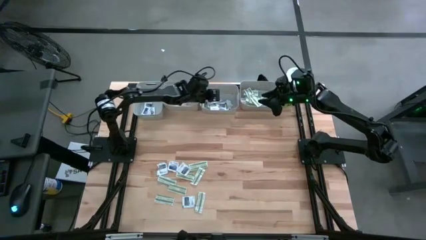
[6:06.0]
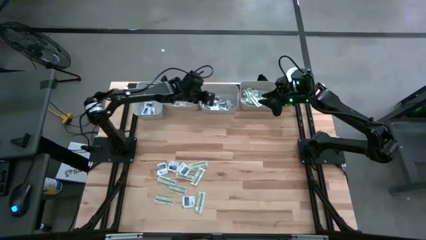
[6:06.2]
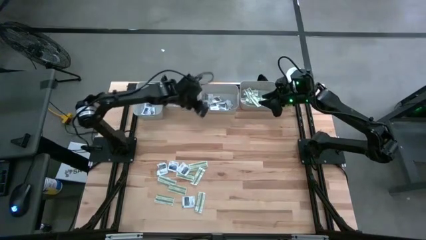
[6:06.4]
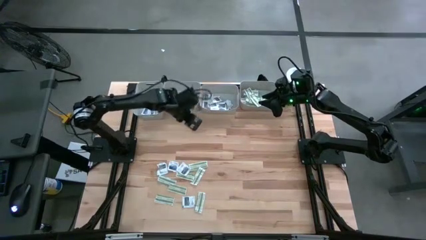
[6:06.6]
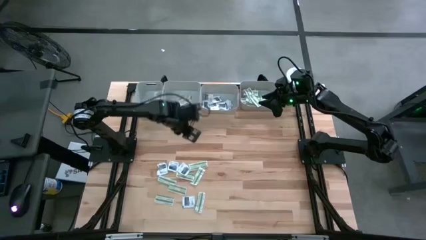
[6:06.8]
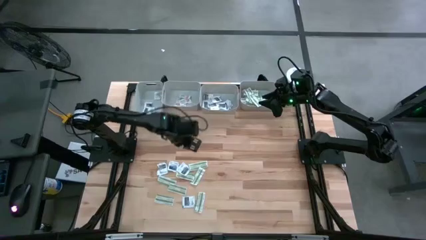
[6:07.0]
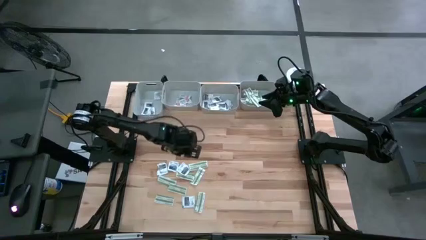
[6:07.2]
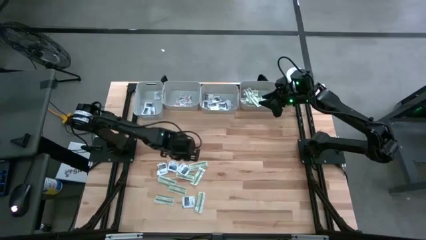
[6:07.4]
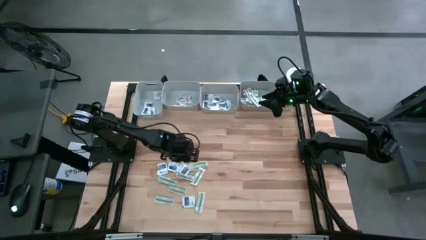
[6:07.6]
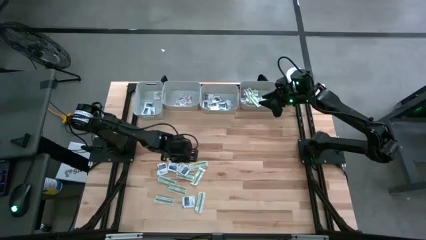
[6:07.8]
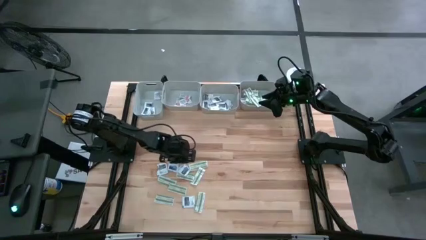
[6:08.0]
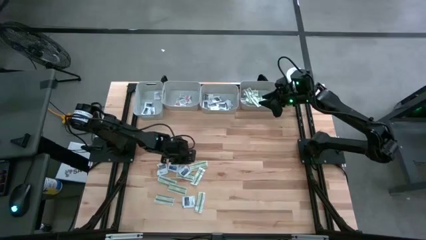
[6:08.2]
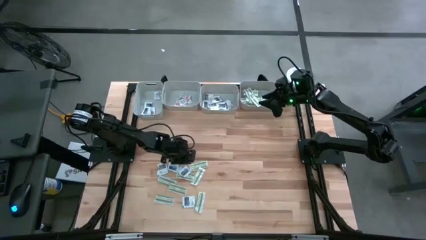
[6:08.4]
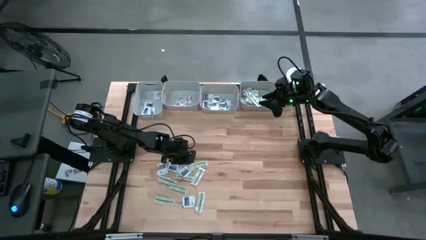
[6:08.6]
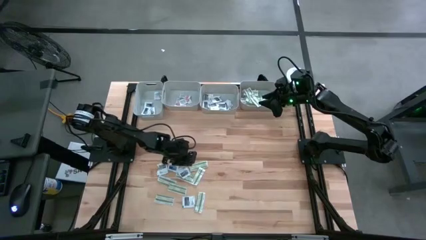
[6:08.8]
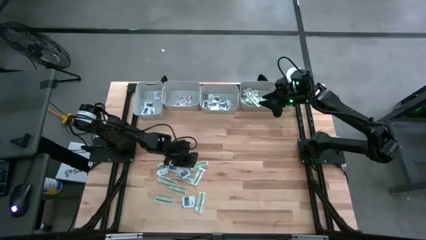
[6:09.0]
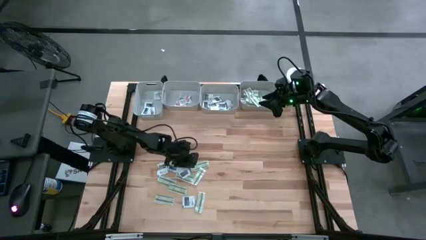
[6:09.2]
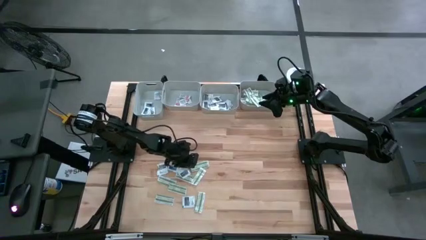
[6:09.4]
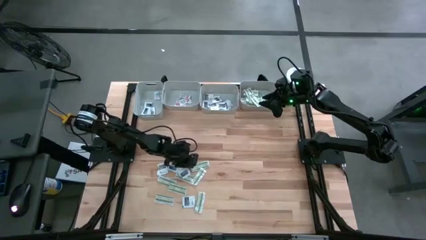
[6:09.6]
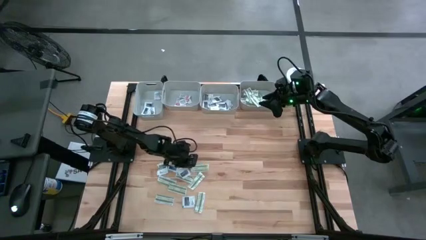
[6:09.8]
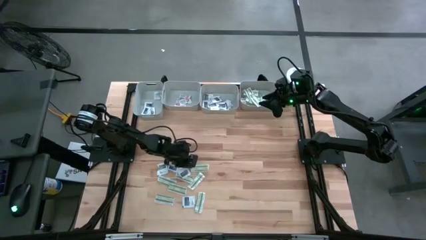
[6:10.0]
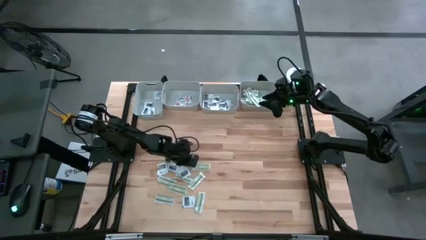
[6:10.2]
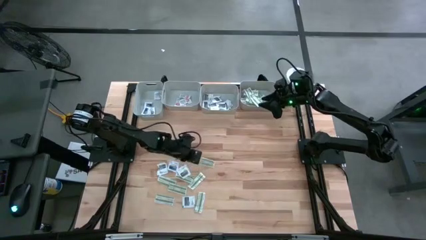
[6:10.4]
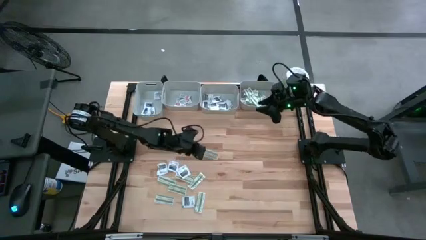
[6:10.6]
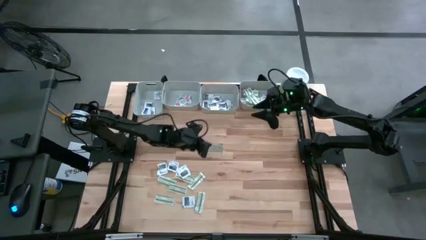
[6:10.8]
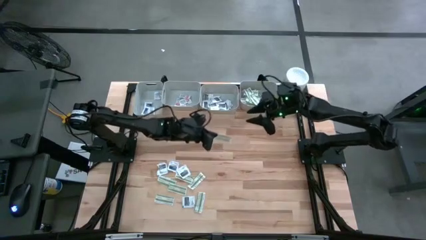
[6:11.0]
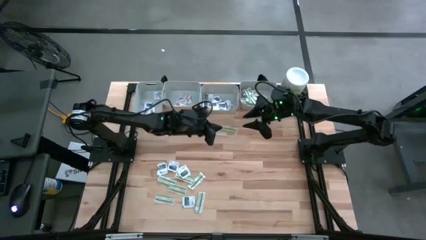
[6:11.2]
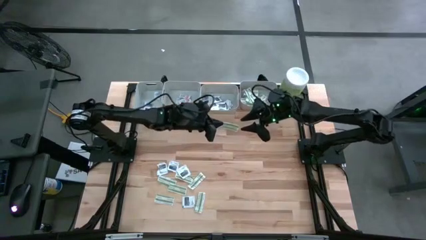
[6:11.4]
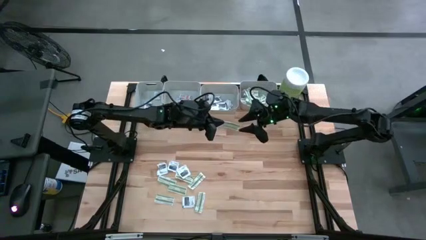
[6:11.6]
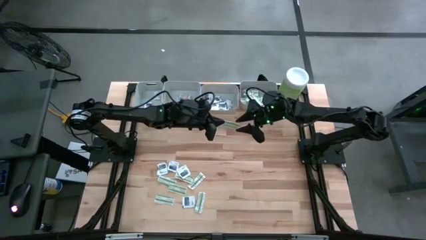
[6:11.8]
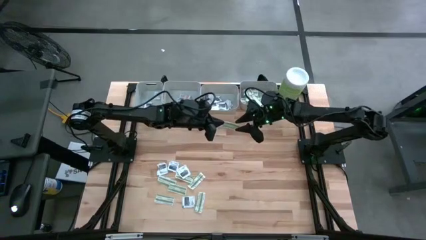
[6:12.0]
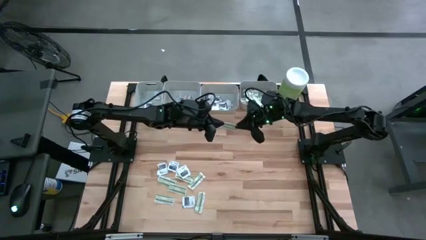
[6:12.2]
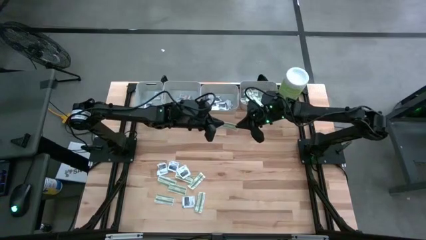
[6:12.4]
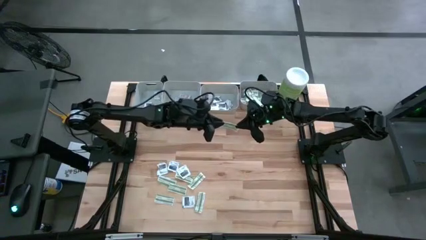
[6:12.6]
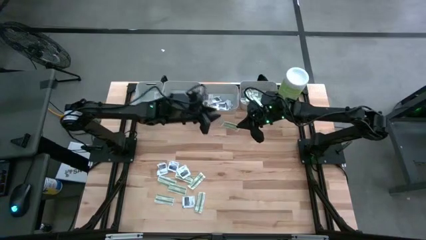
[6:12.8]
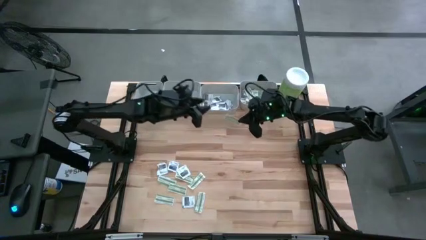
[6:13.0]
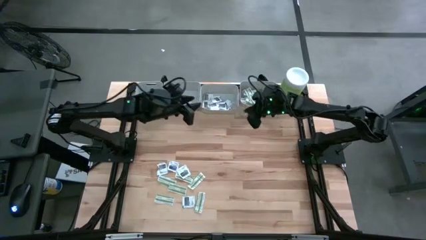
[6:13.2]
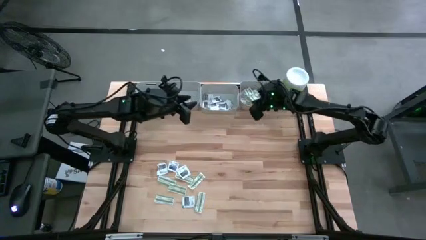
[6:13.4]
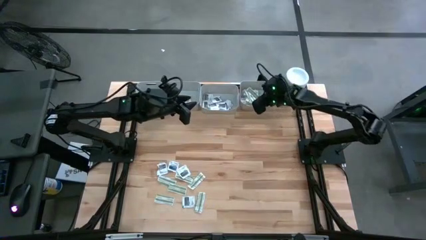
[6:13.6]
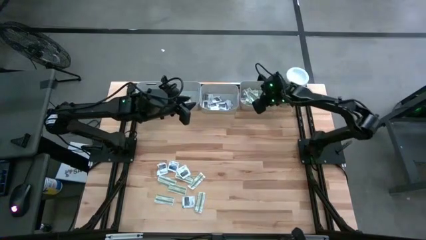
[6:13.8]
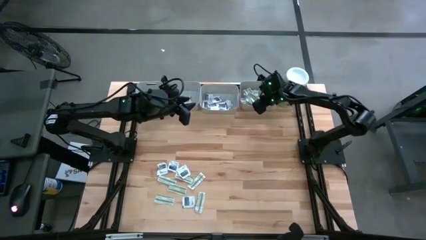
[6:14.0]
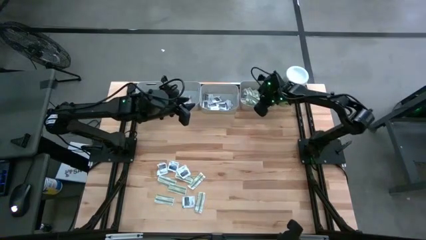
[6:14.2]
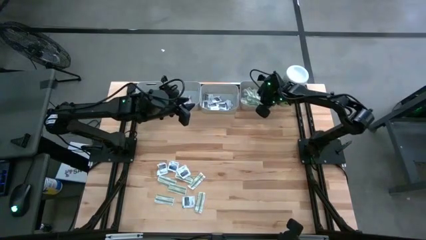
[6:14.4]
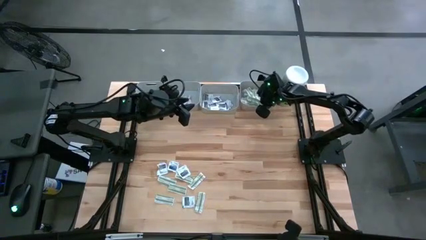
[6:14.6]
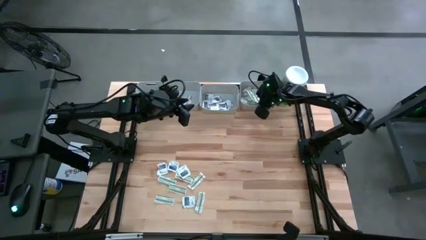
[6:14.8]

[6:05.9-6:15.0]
Task: Pick & Place First Aid Supplies
Put the green bandage into the right gray bin

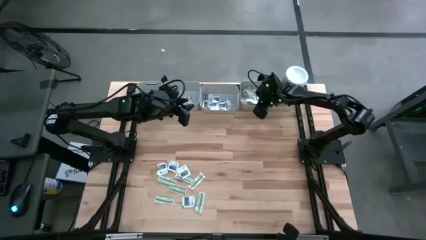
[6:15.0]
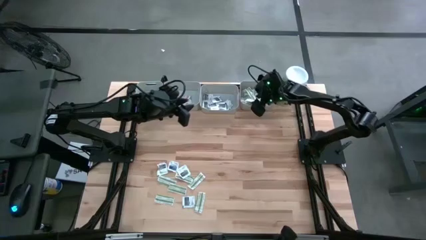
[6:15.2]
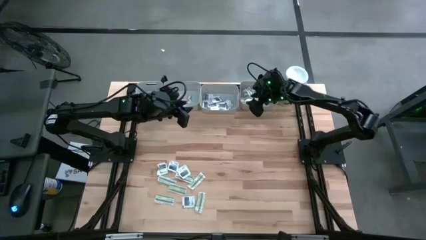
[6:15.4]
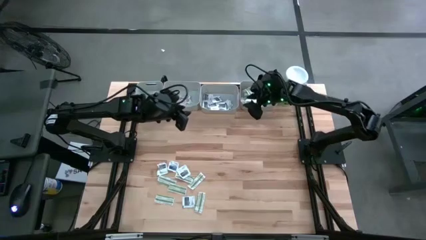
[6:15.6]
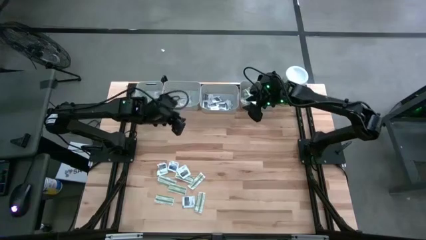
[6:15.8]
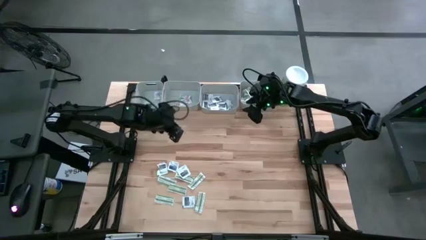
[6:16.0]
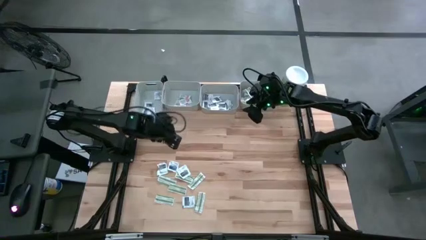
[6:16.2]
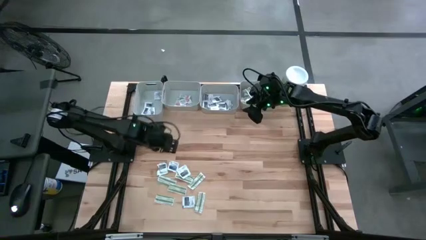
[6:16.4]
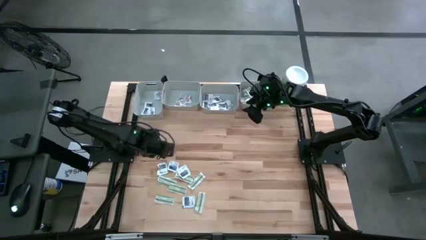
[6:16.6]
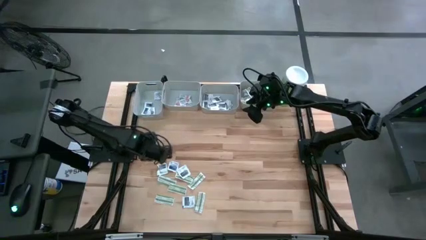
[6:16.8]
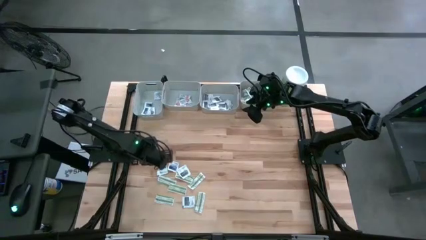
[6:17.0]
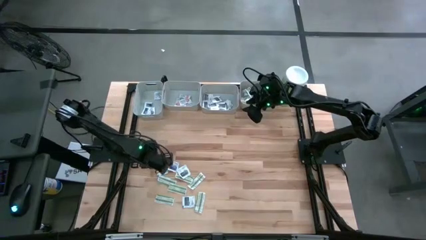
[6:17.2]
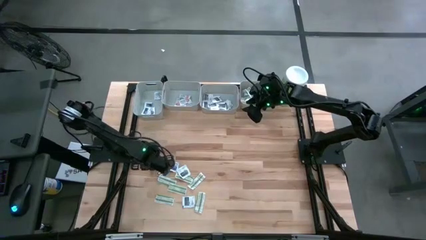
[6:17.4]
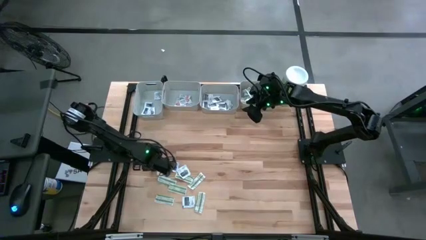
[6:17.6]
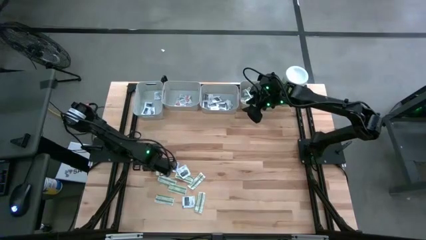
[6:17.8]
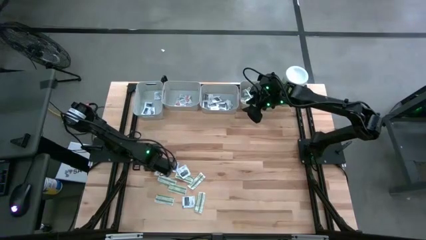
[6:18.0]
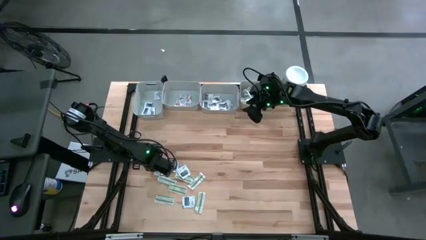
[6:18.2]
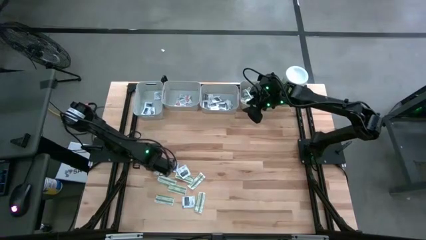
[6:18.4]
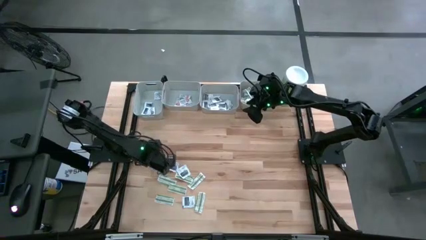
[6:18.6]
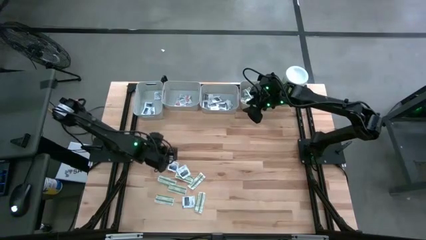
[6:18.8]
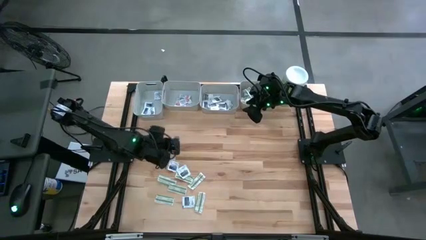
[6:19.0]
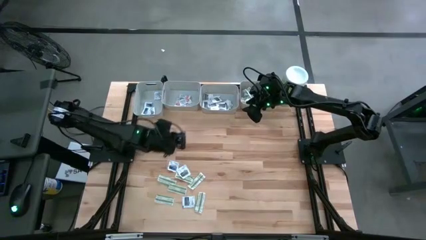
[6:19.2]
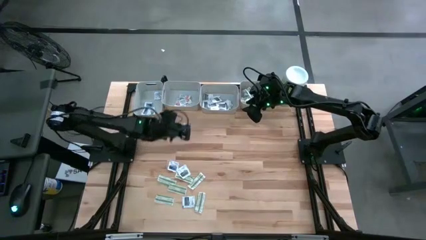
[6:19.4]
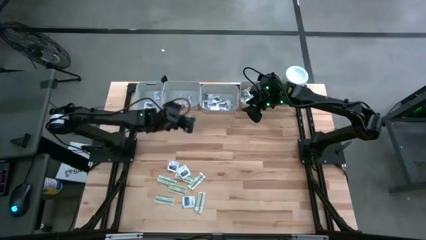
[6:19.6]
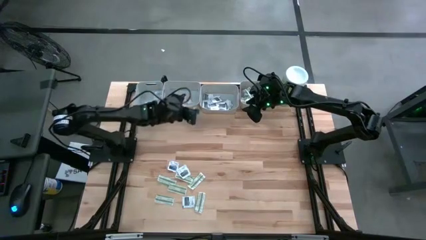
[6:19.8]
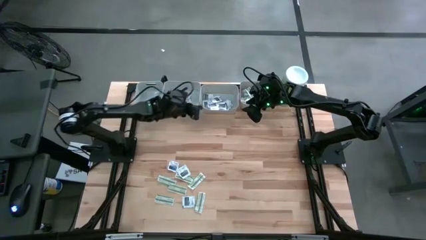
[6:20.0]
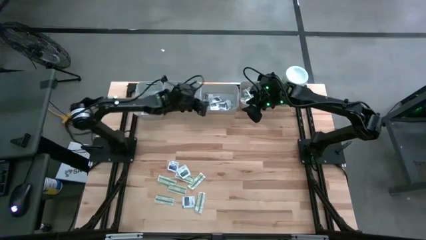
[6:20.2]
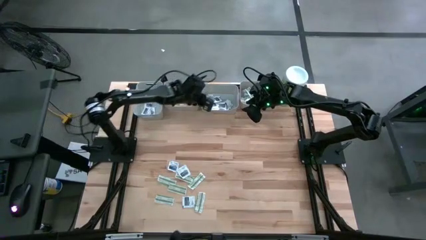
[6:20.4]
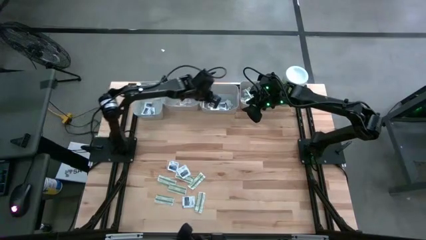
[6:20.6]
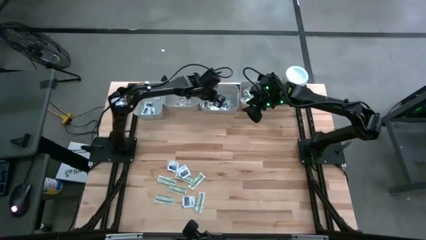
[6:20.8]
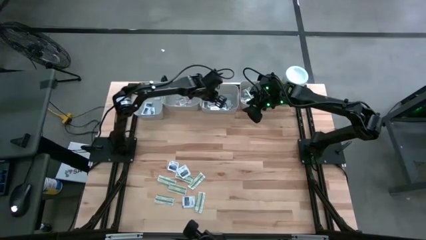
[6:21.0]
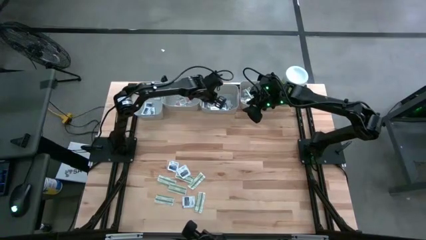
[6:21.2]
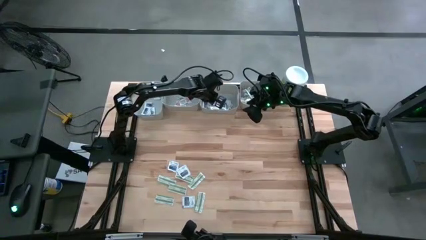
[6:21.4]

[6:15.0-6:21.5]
Put the gray towelette pack into the middle right gray bin
